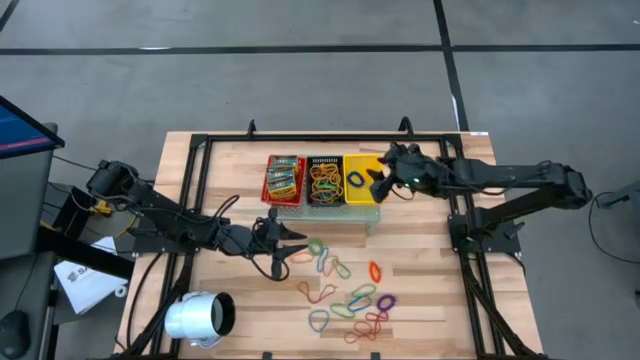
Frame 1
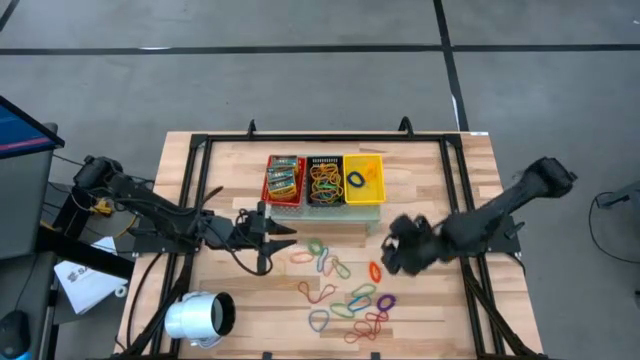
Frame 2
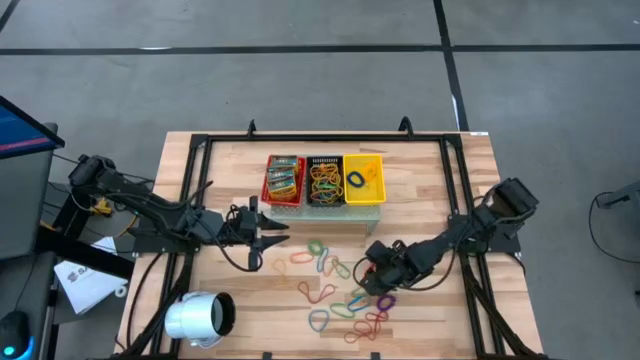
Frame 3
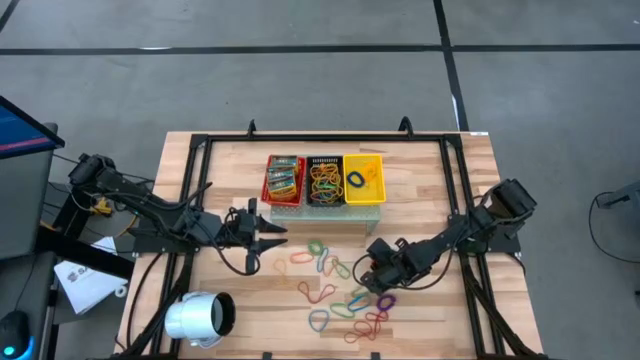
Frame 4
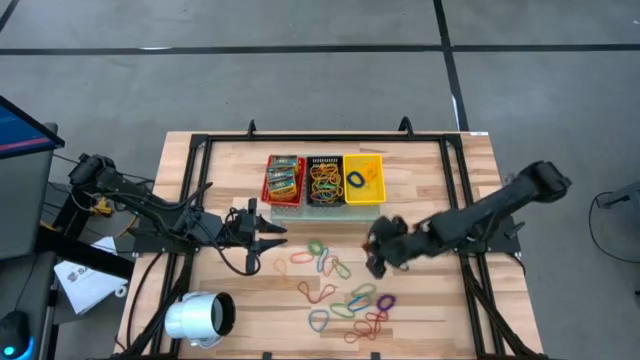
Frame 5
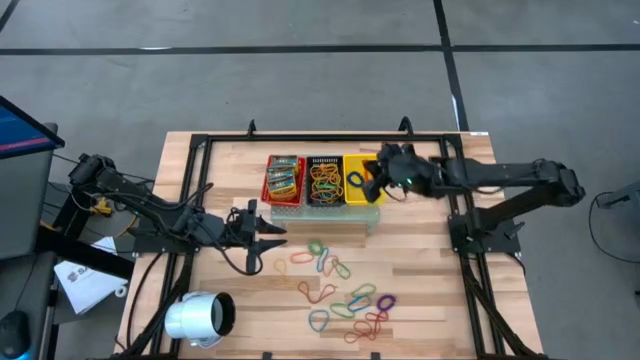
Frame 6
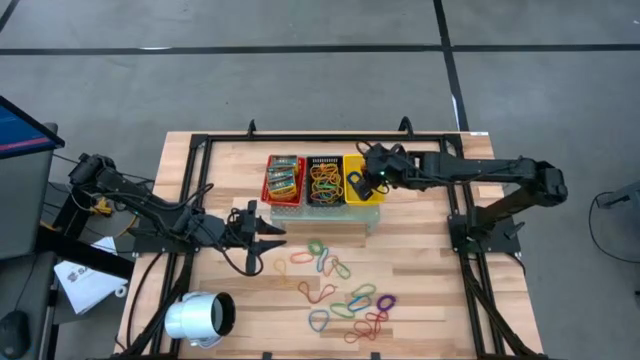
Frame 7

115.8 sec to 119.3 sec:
Task: Pick & Place Office Desk Supplies
Put the orange spring keychain into the yellow bin on the shelf

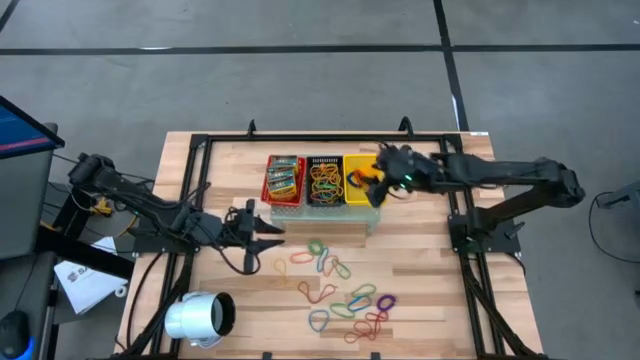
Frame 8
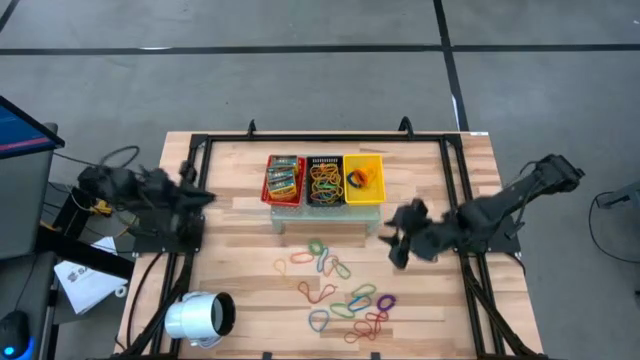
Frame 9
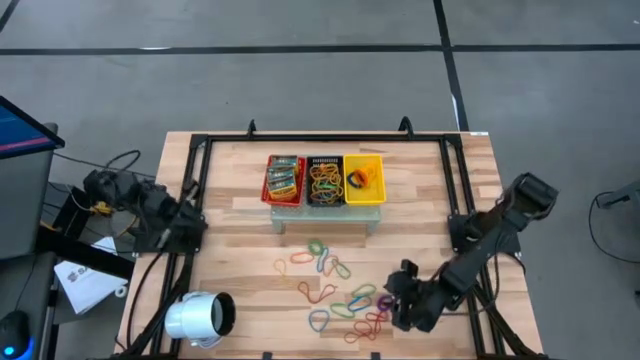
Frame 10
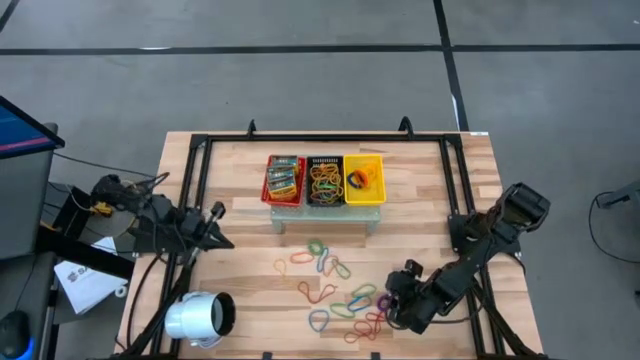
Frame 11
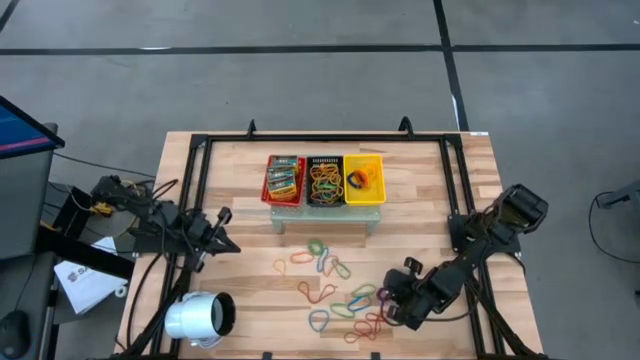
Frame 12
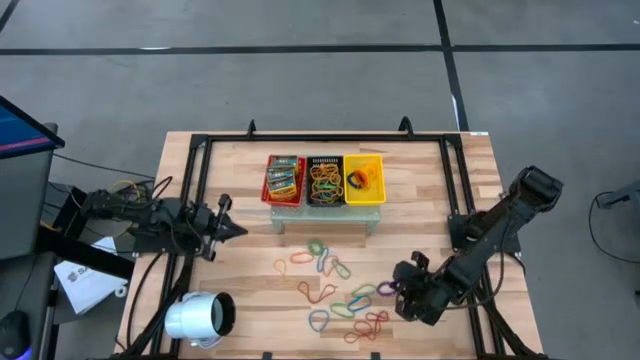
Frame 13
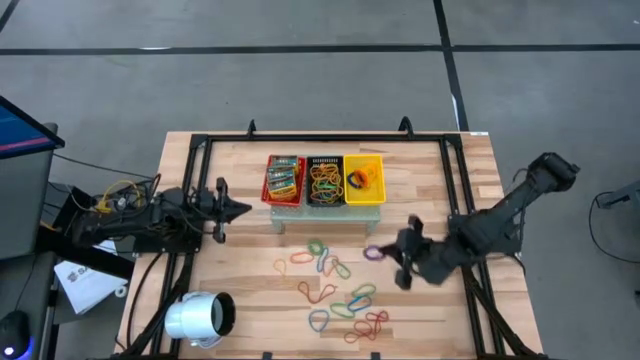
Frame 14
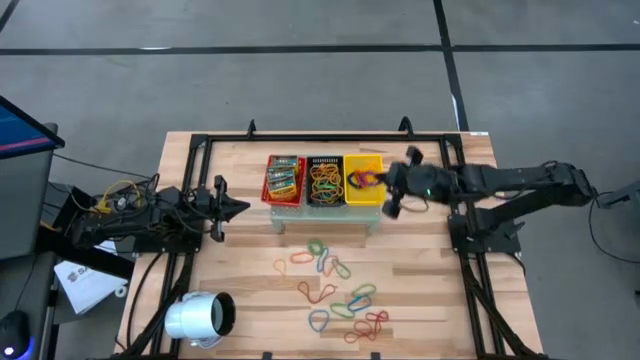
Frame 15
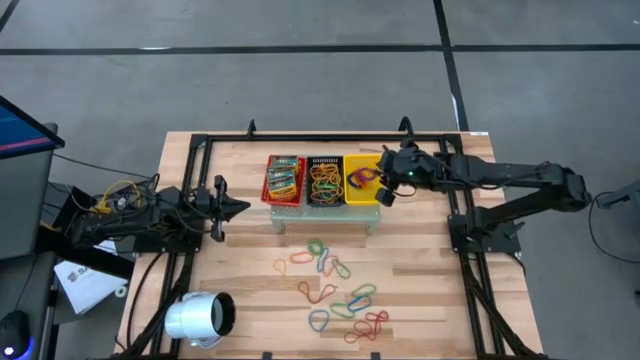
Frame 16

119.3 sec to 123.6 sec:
Put the purple spring keychain into the yellow bin on the shelf

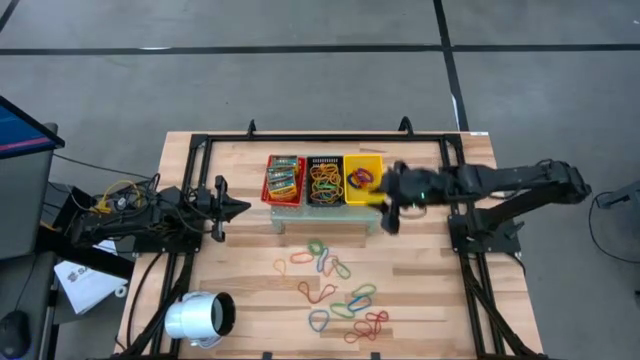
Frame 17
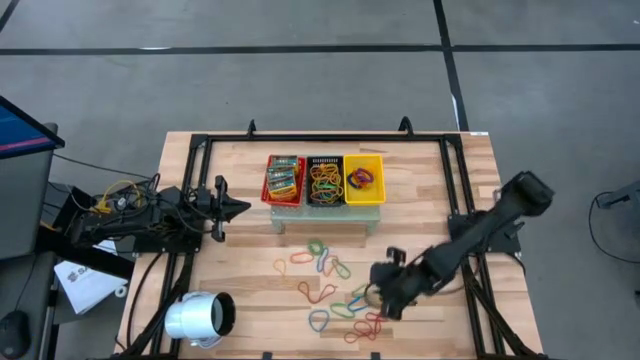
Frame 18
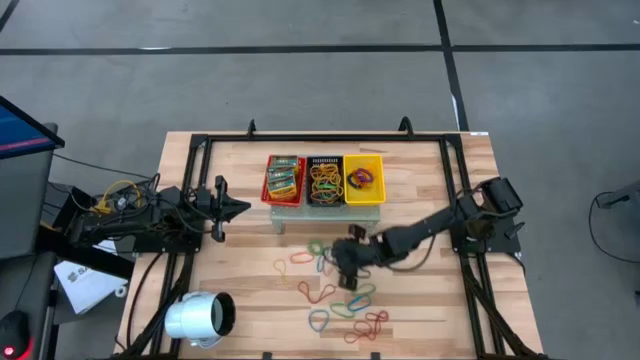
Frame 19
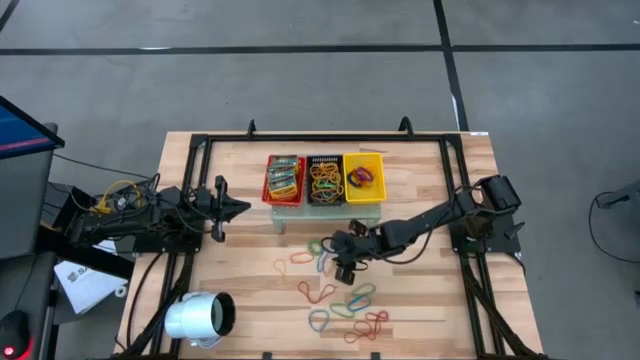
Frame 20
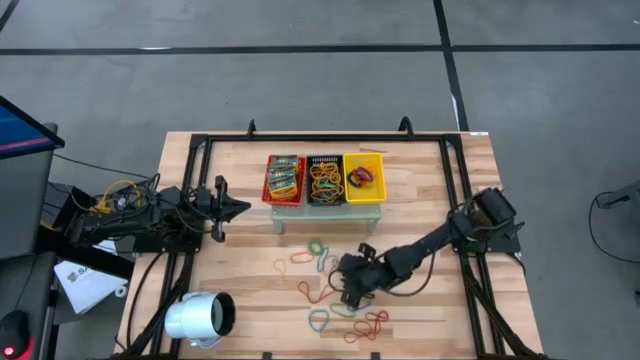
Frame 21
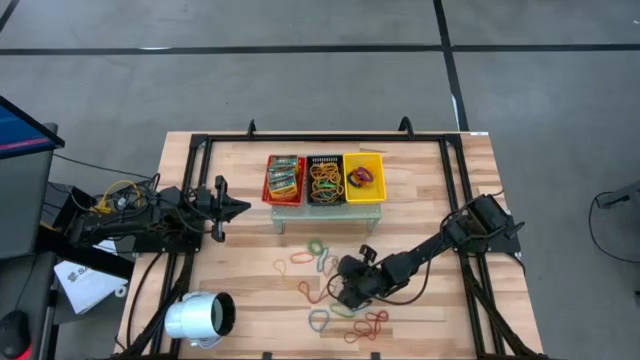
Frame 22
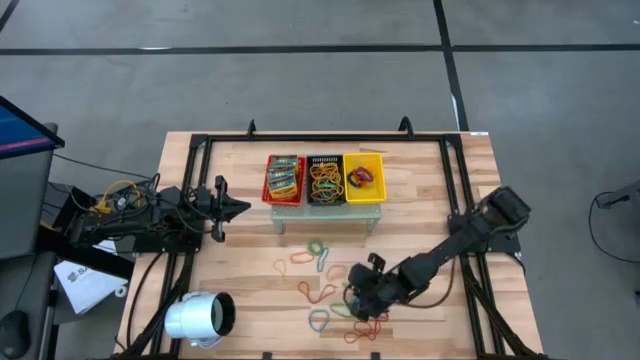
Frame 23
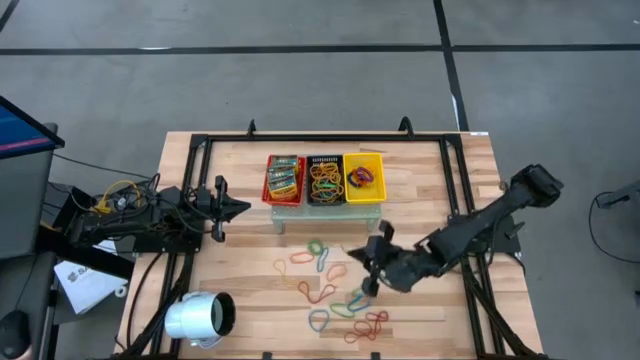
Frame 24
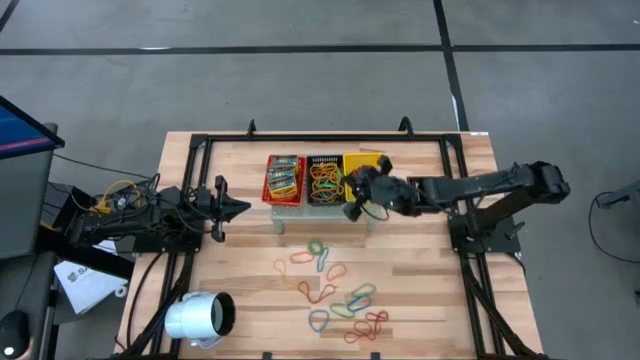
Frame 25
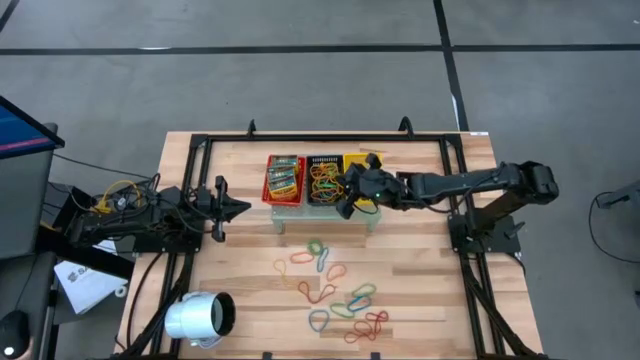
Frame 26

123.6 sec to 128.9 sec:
Put the green rubber band into the black bin on the shelf

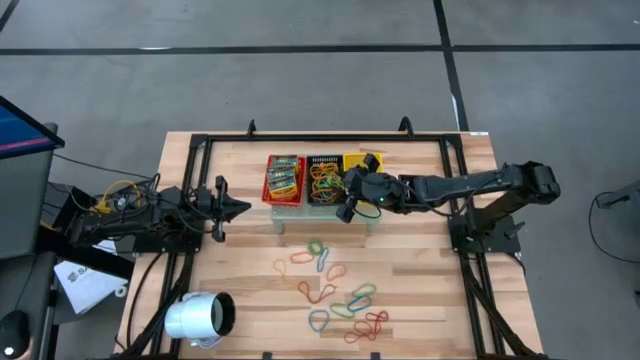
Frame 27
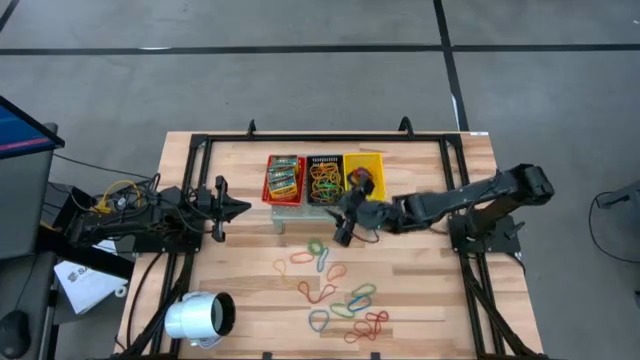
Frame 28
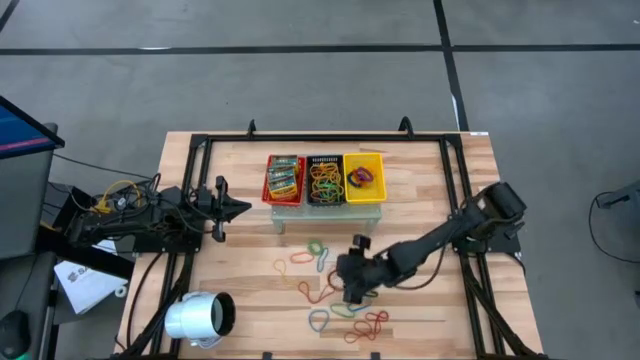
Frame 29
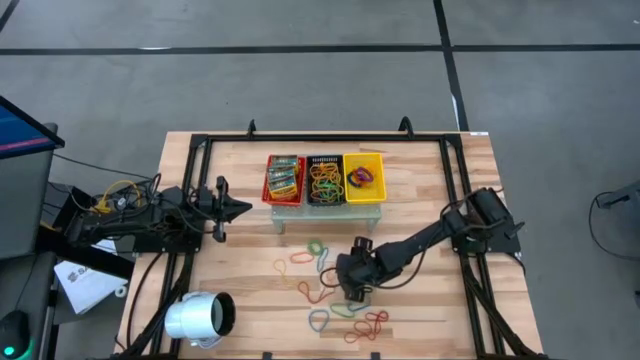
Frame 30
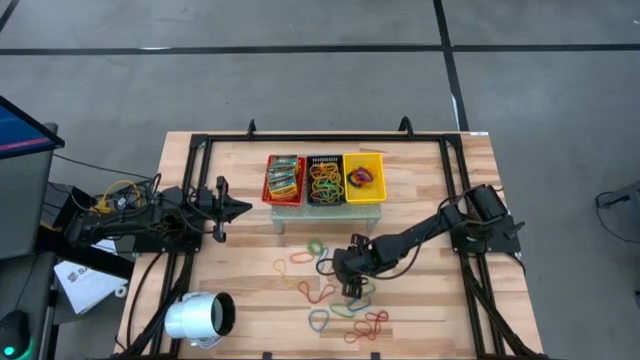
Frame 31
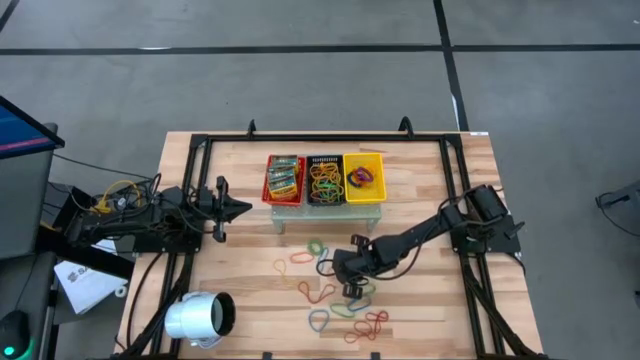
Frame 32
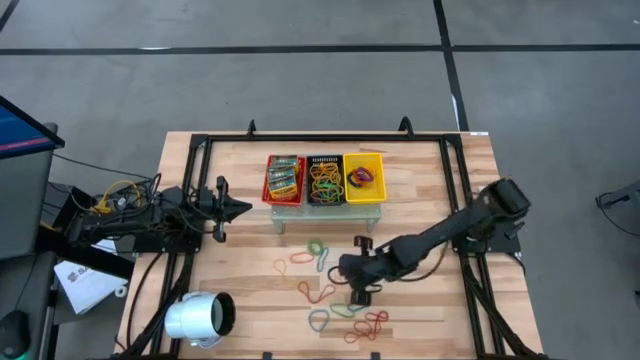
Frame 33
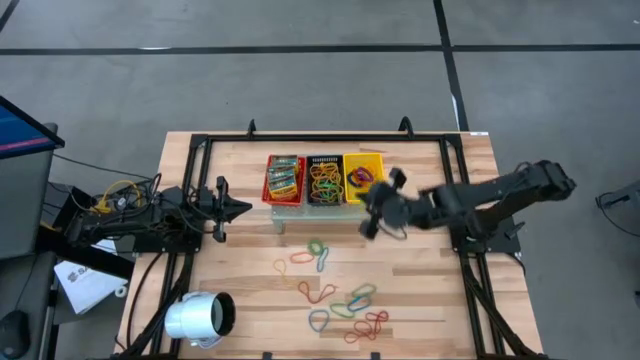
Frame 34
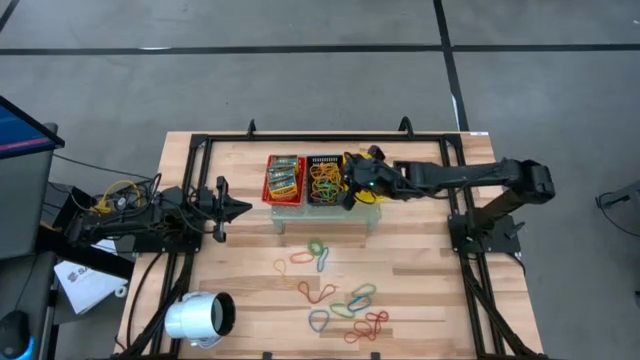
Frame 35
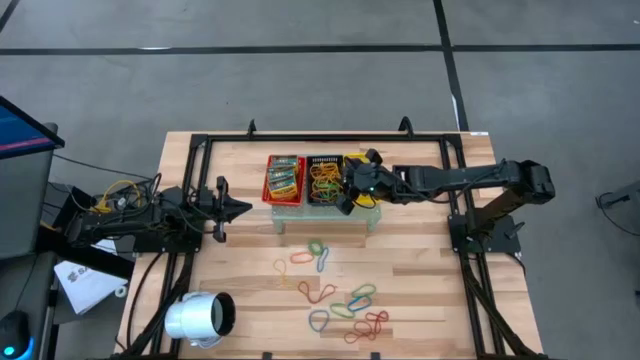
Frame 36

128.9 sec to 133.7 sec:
Put the orange rubber band into the black bin on the shelf

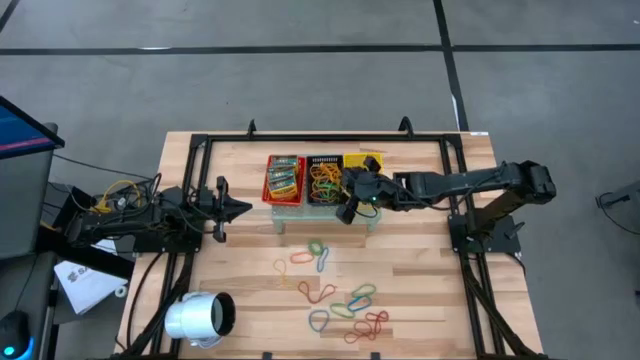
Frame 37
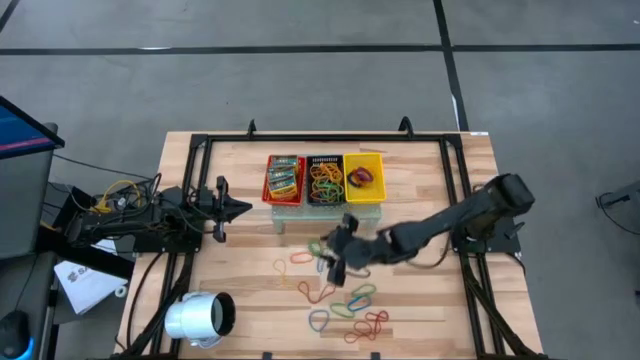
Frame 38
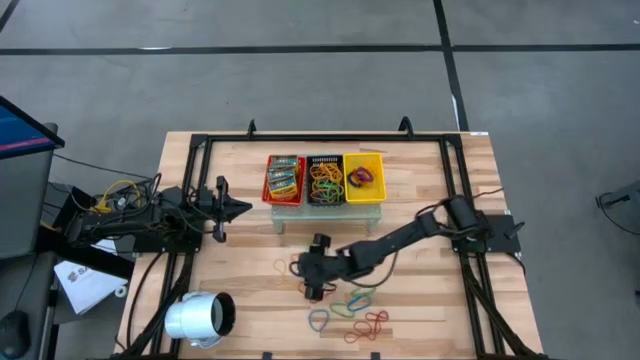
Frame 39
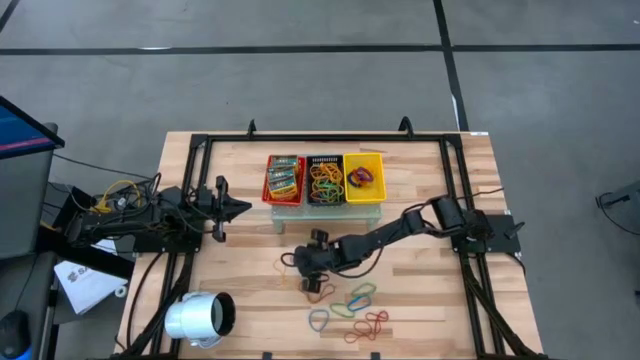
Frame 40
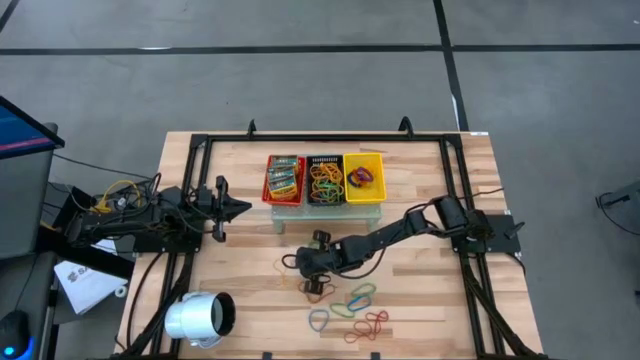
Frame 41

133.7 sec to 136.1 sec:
Put the orange rubber band into the black bin on the shelf

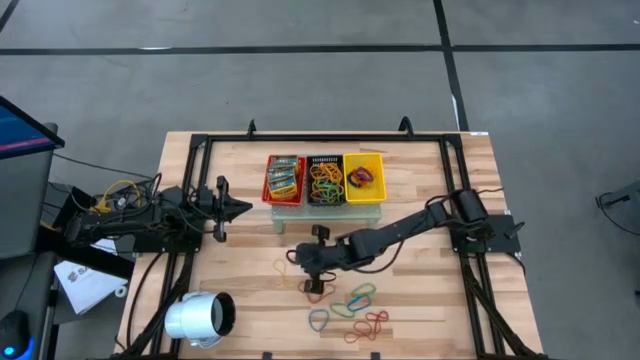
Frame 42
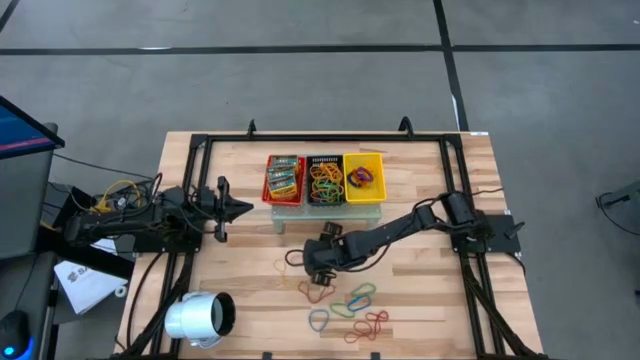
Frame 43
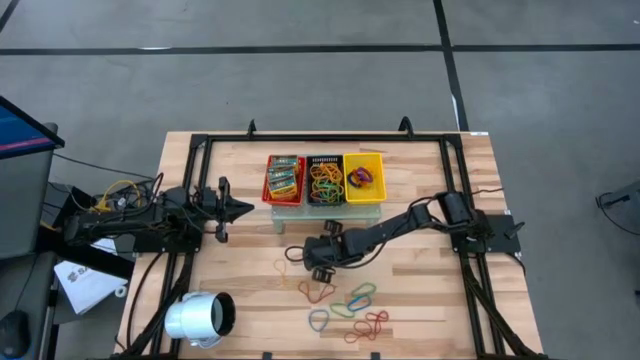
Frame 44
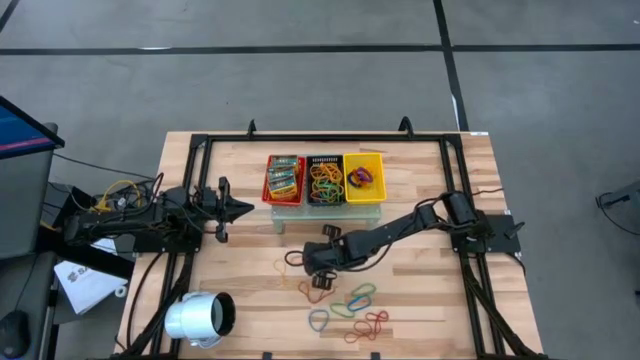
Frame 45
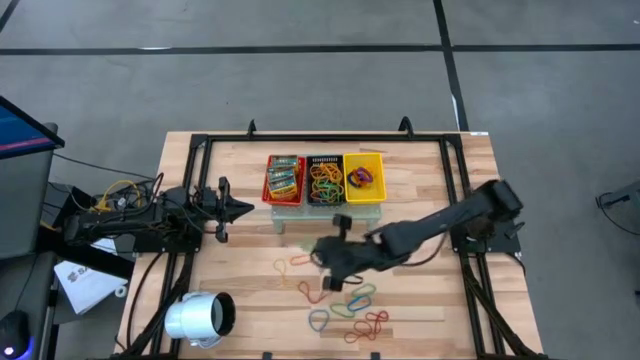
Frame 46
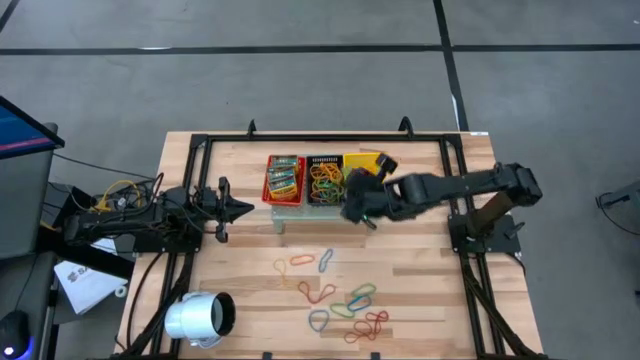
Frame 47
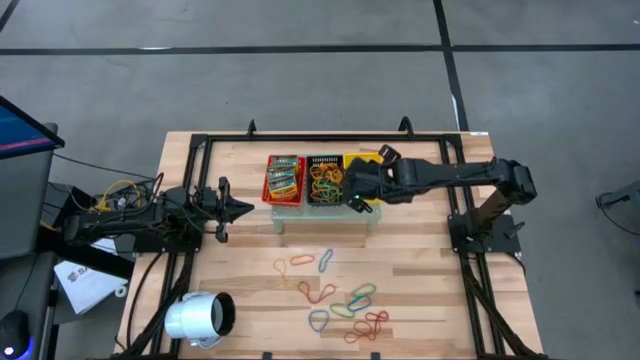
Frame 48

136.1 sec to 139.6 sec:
Put the green spring keychain into the yellow bin on the shelf
